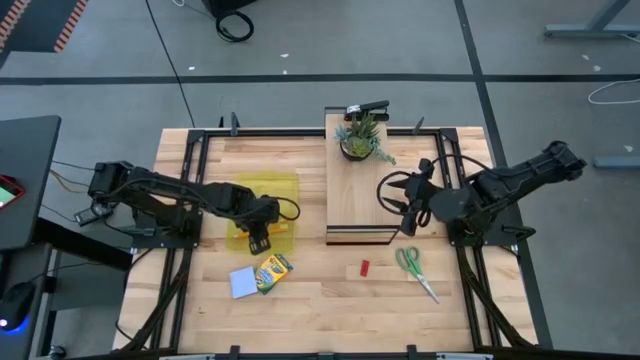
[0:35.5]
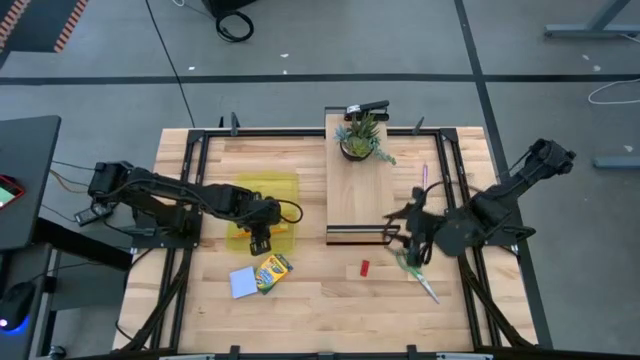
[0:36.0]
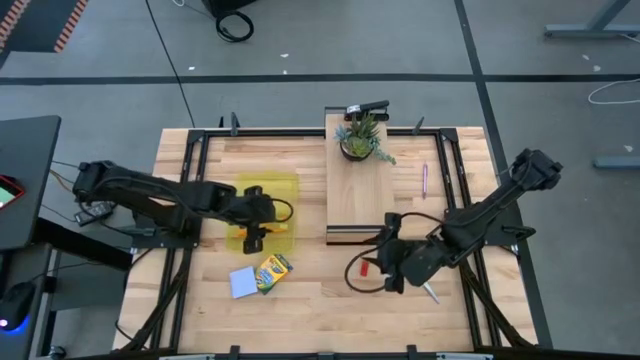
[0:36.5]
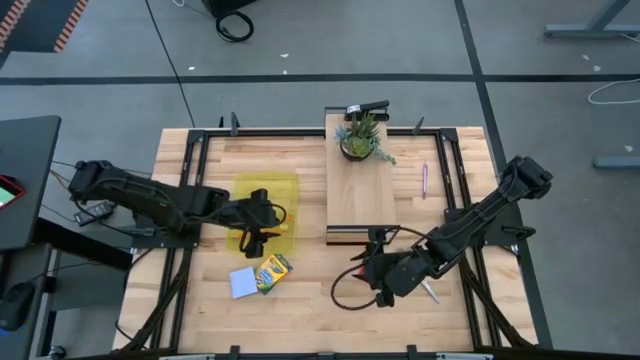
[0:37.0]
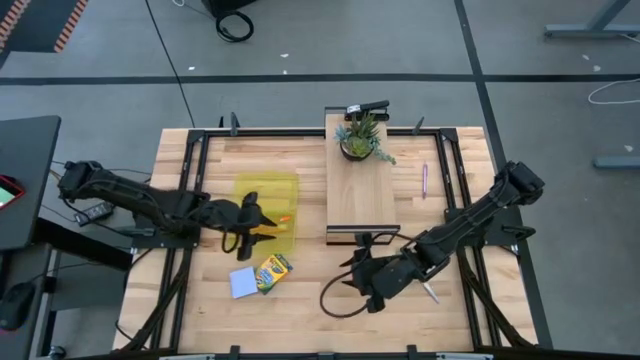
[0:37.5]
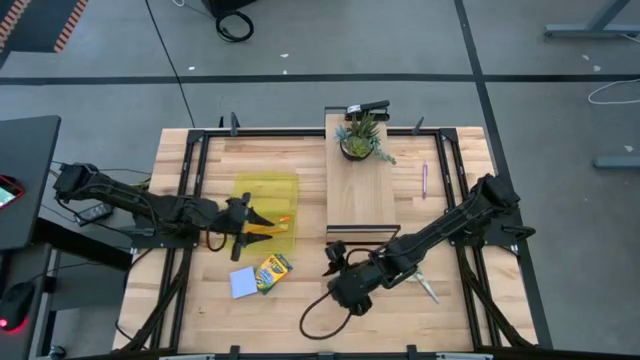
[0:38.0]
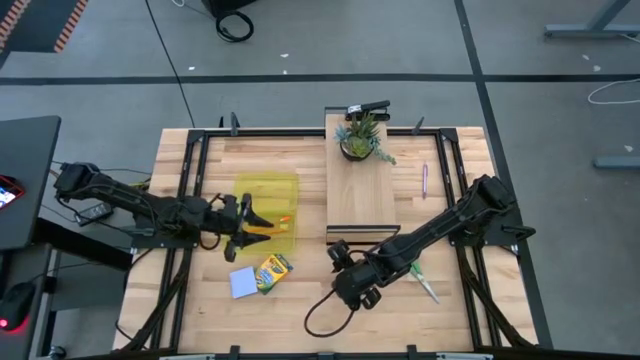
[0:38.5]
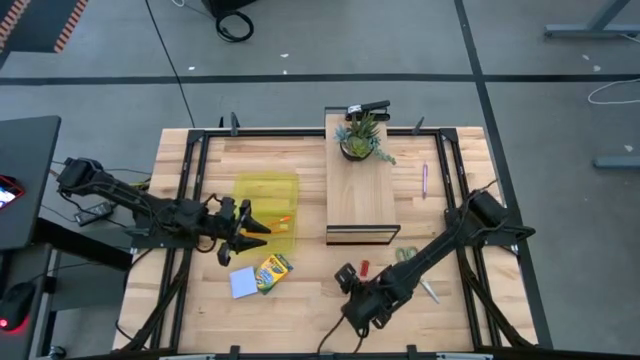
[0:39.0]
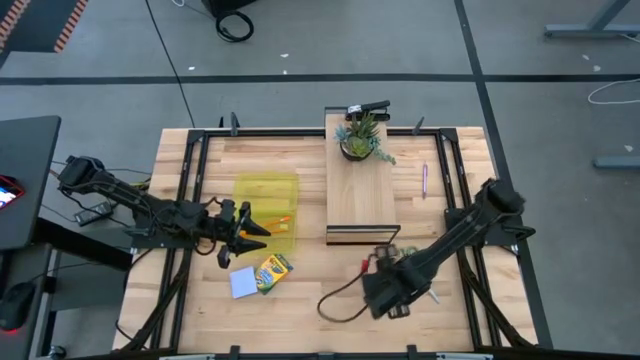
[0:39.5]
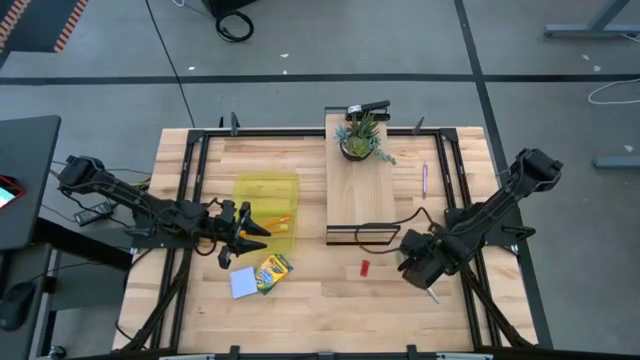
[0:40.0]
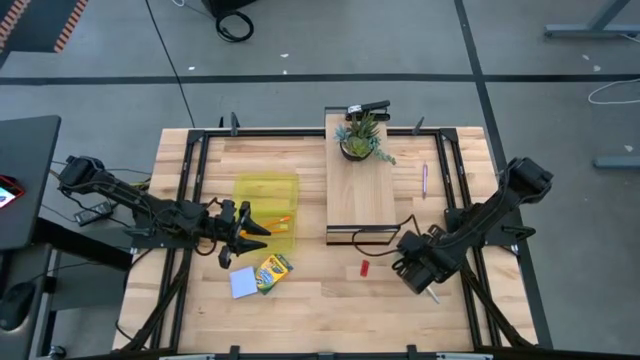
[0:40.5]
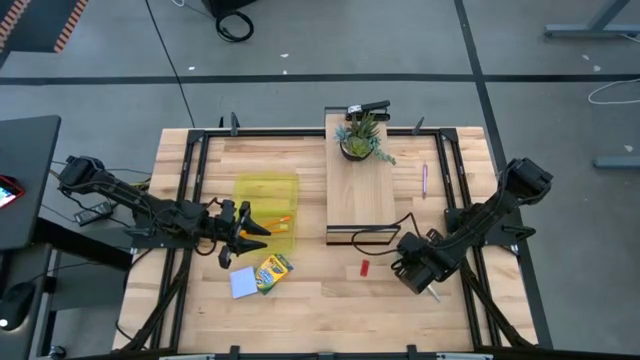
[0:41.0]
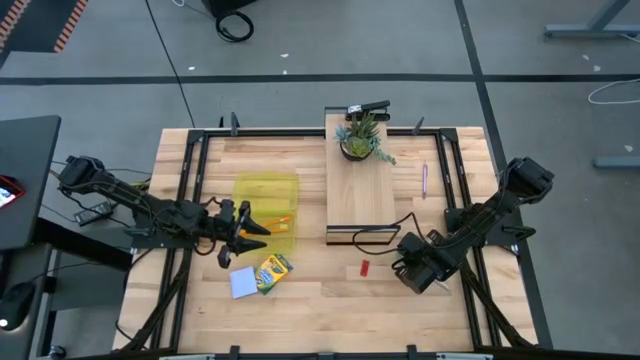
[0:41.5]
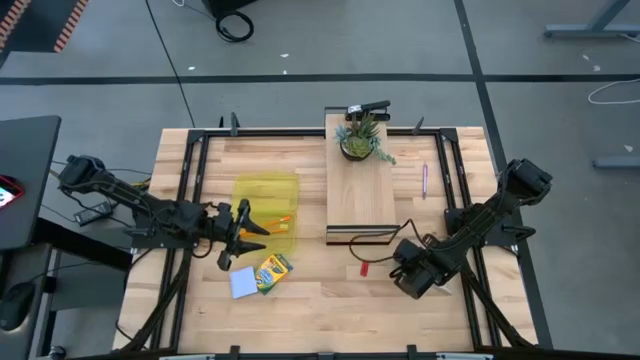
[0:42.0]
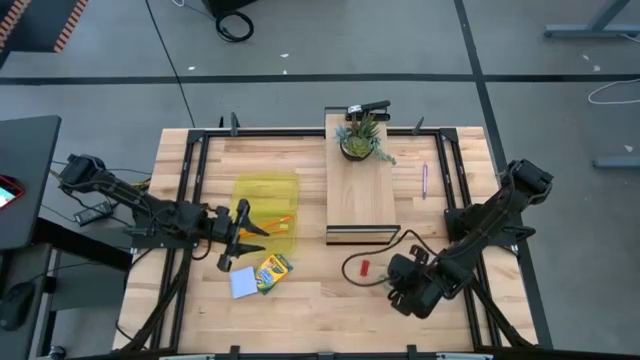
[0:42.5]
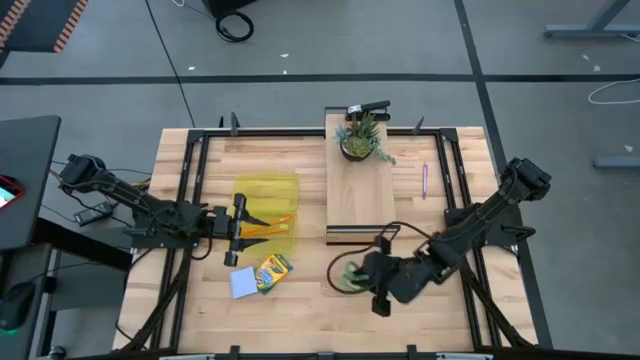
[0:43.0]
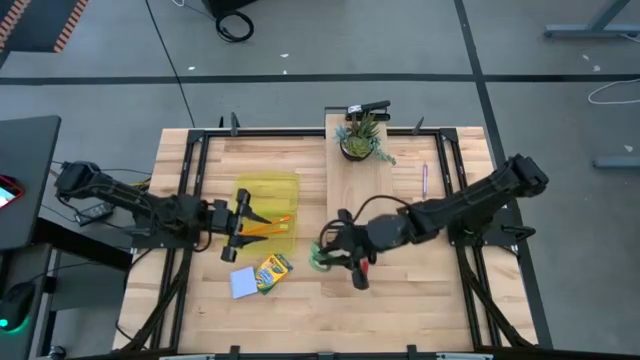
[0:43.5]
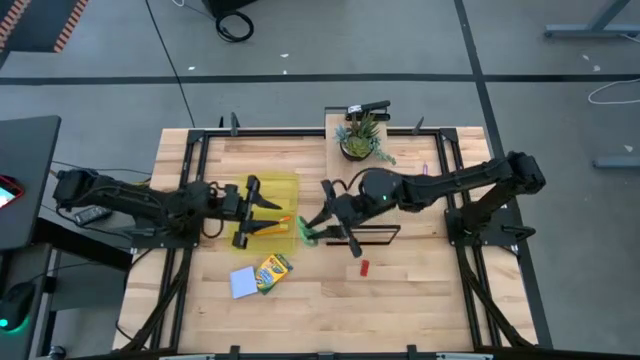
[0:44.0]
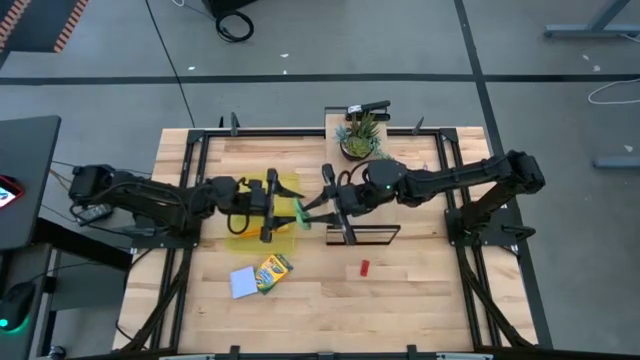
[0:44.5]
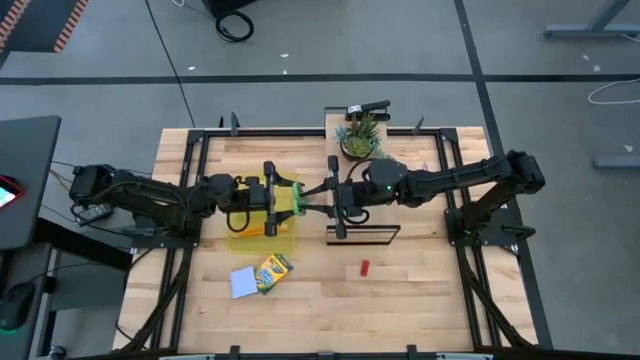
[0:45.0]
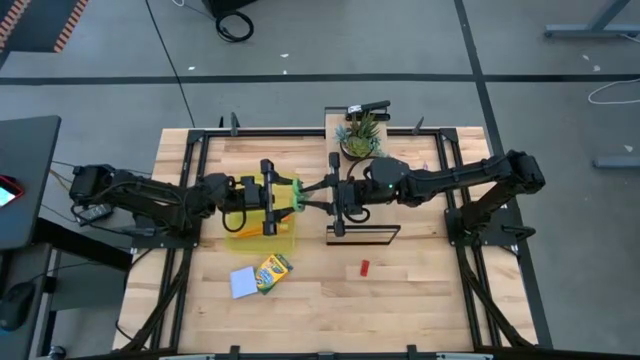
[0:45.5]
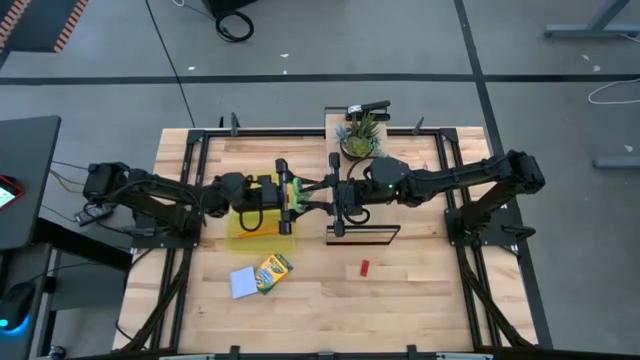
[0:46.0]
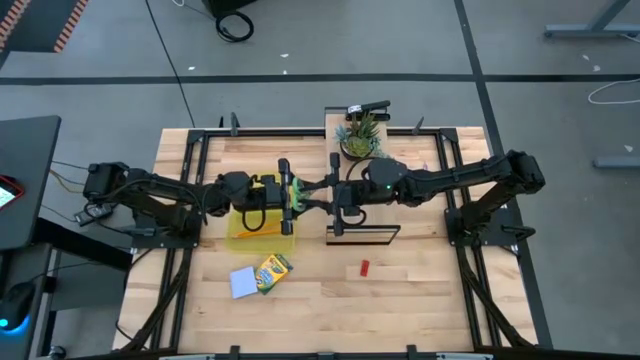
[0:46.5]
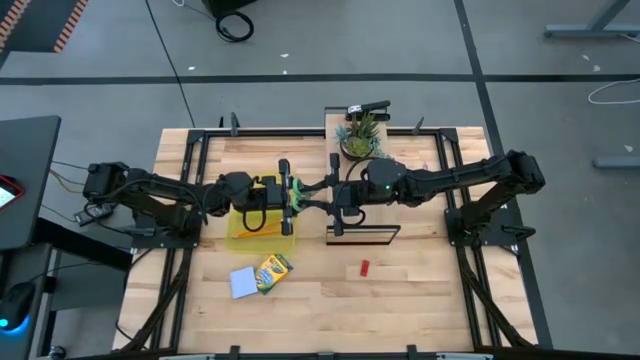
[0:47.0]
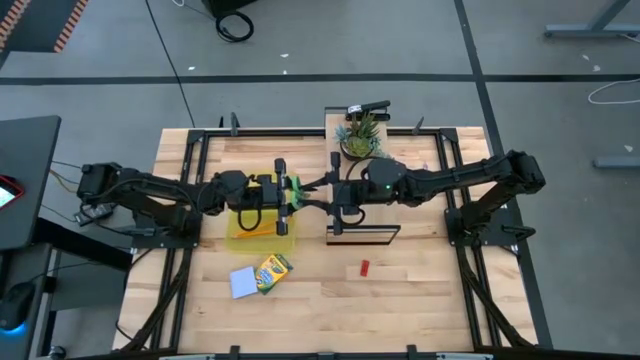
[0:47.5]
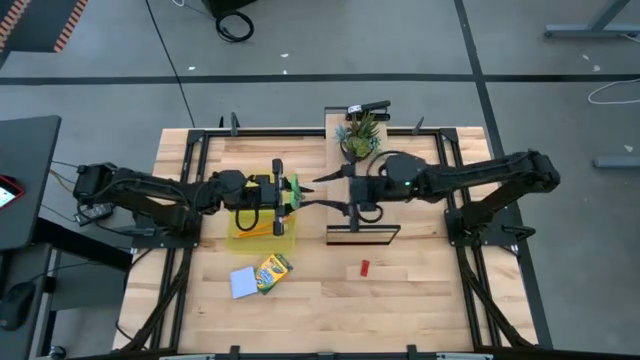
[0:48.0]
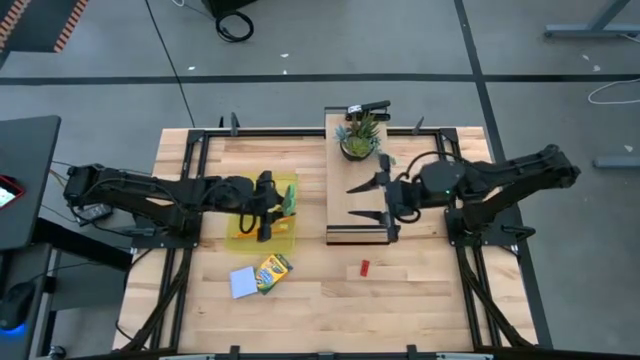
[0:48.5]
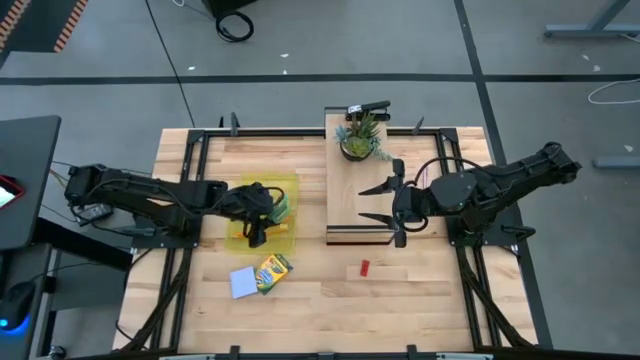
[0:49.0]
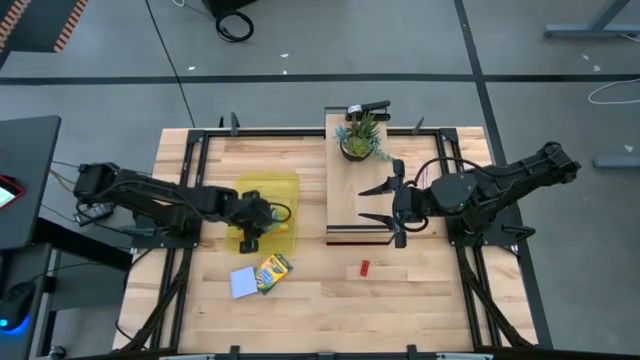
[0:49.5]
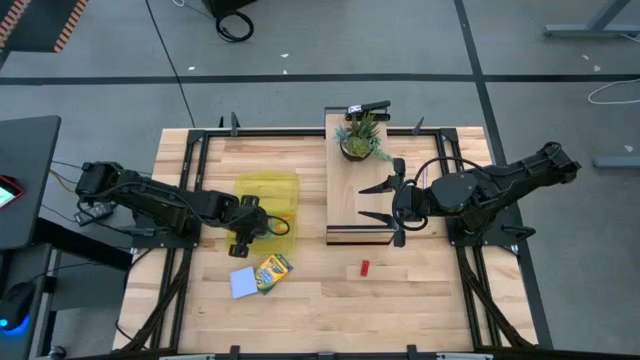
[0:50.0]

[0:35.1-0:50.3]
Task: Pack school essentials
Put the green scissors into the yellow supply box

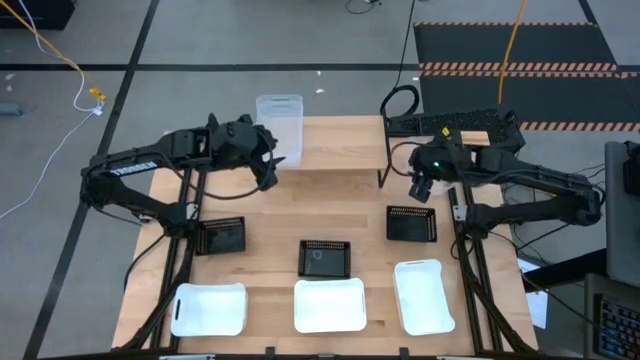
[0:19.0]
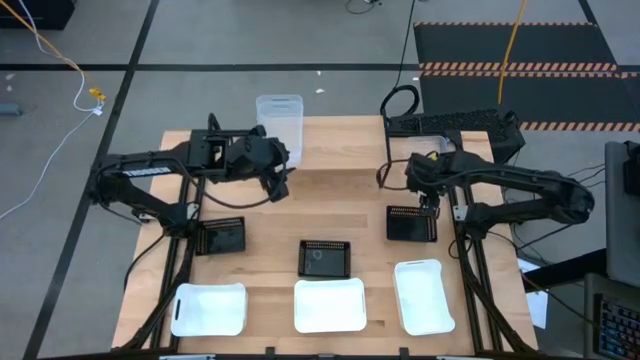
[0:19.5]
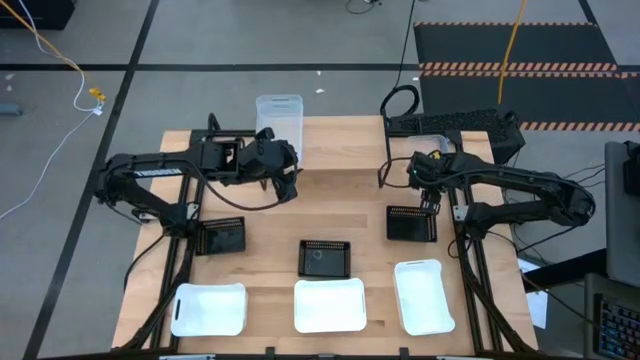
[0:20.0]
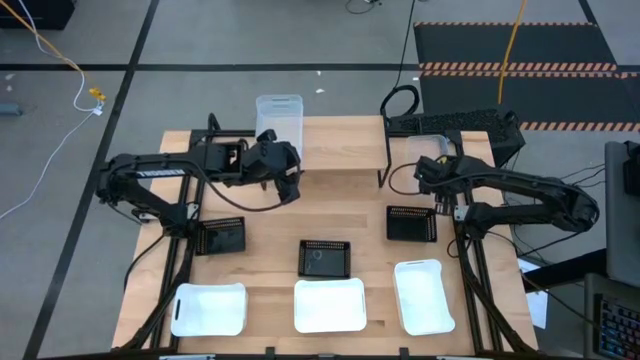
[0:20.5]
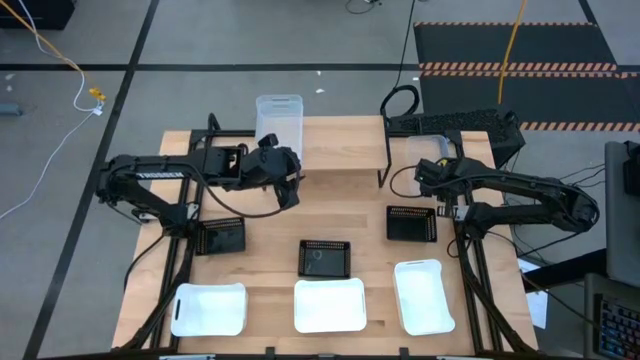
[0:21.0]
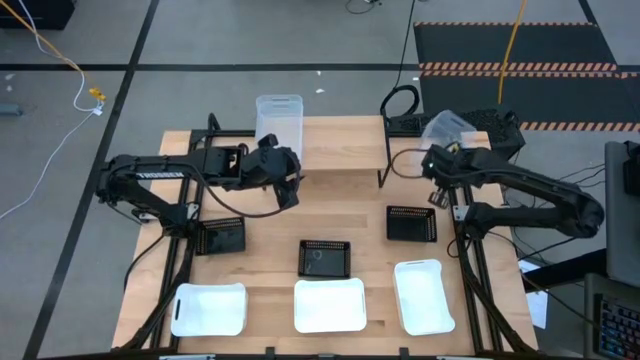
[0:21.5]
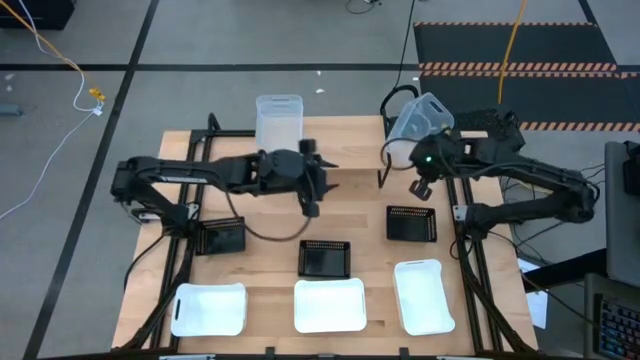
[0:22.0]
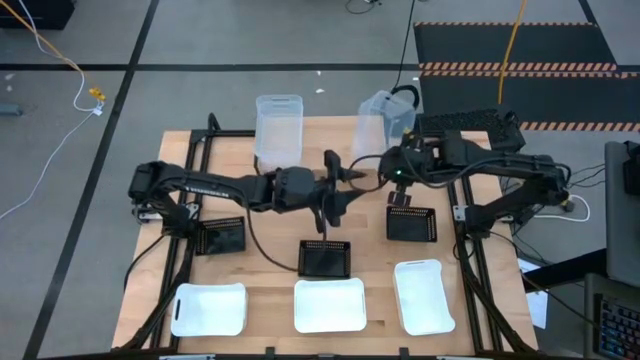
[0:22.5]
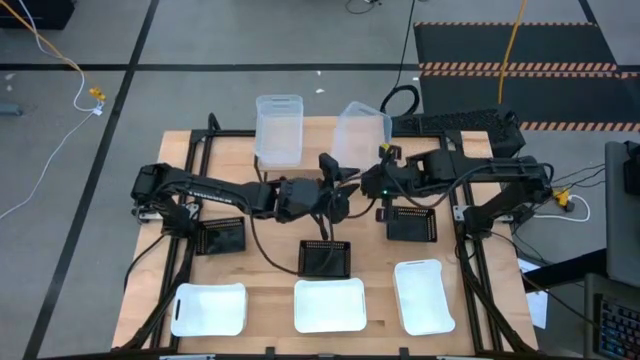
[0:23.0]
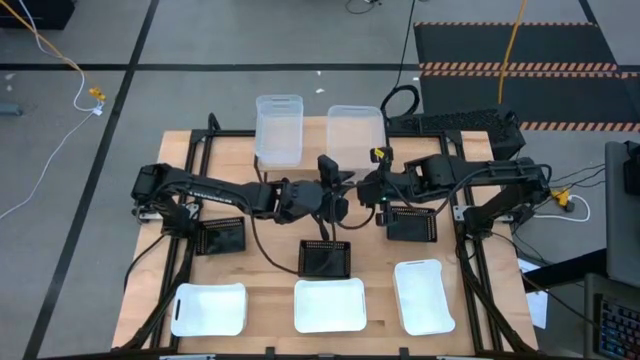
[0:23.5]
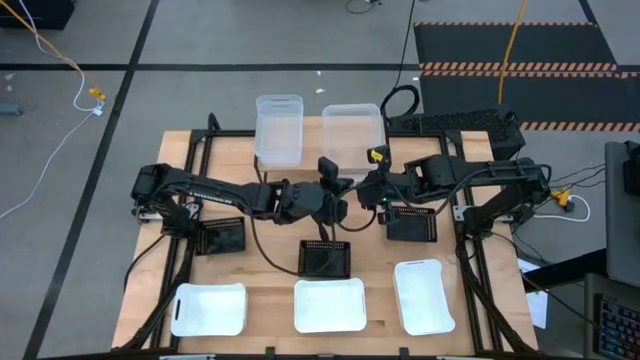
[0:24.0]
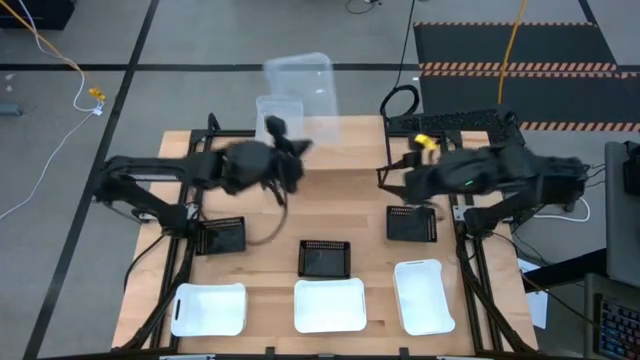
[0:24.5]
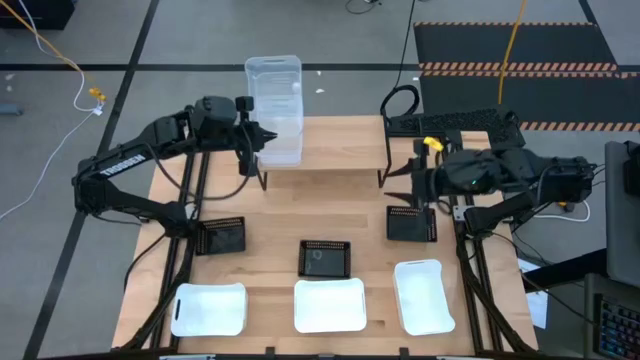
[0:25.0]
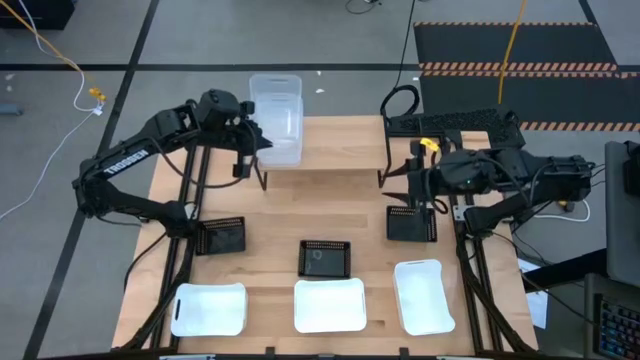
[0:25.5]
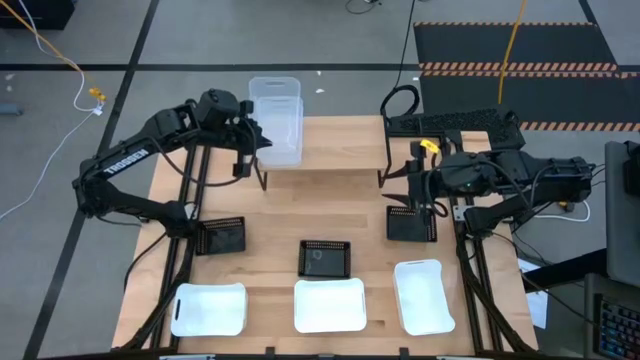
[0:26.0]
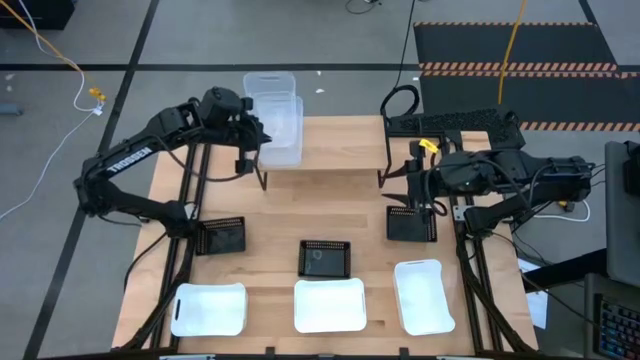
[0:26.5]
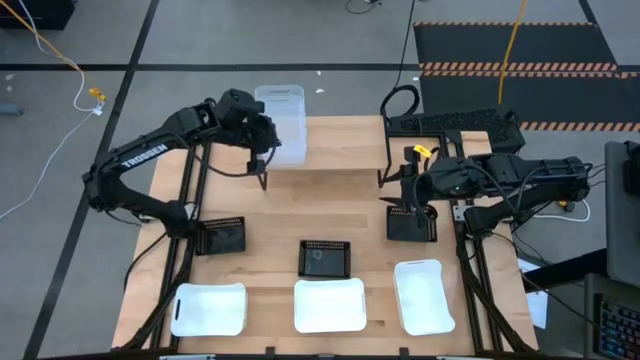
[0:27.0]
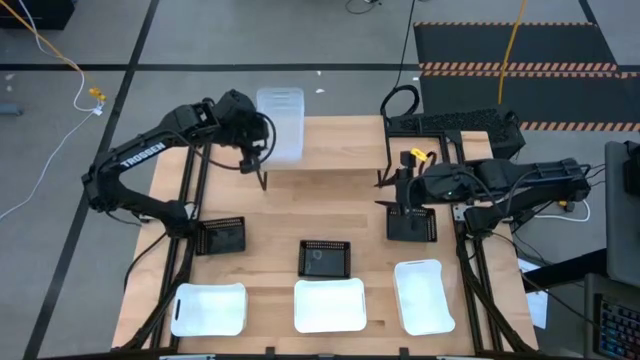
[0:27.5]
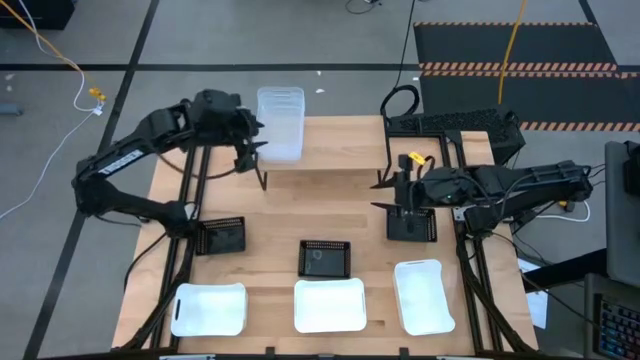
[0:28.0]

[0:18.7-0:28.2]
Task: Stack baskets on shelf by color
Stack the transparent bin on top of the transparent bin on the shelf
